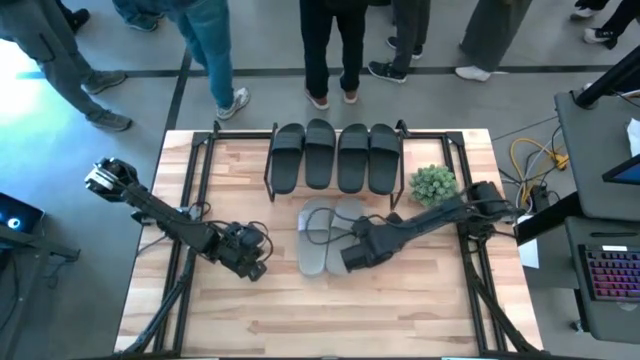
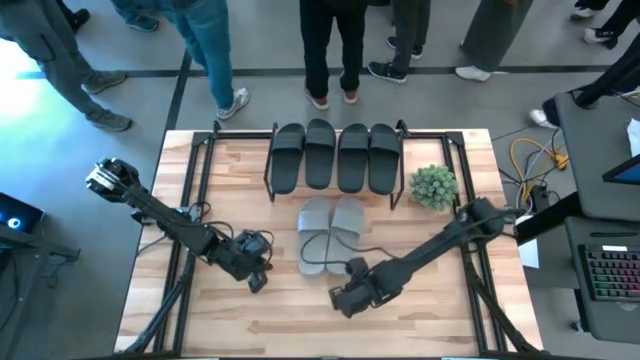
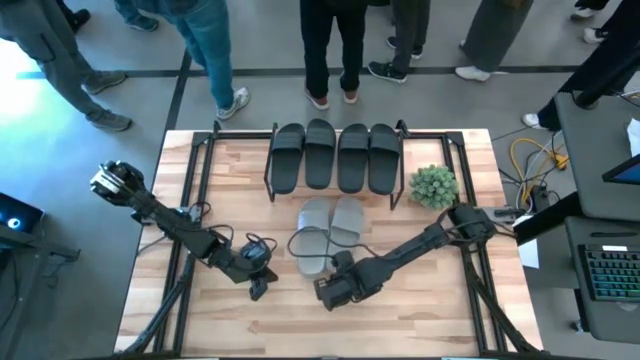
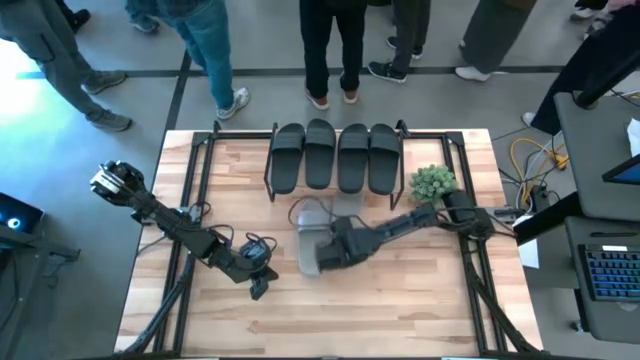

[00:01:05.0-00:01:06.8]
Task: Pick and place slides into the shelf
Move the gray slide under the shelf

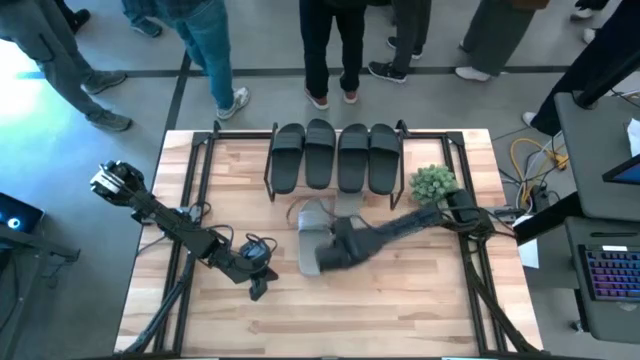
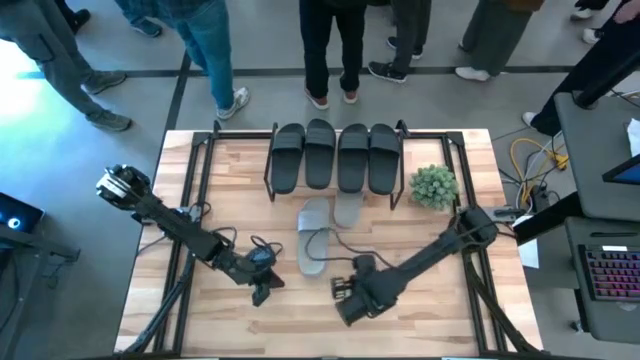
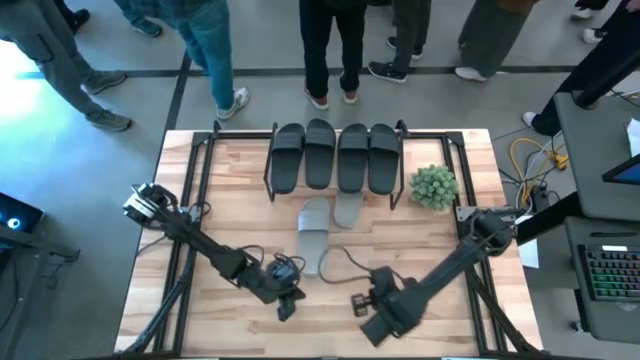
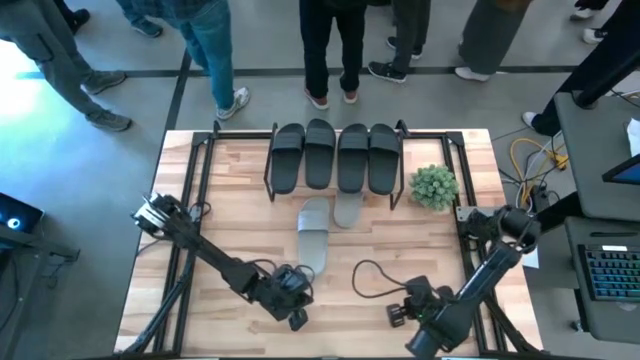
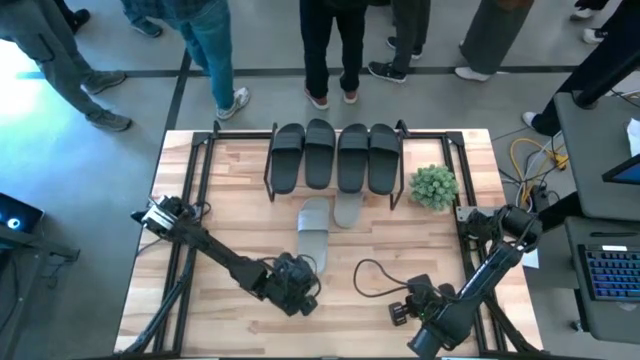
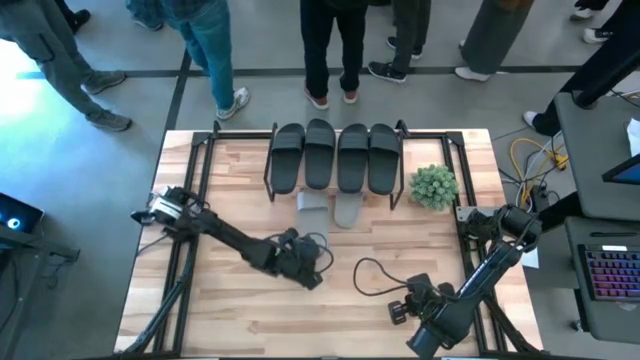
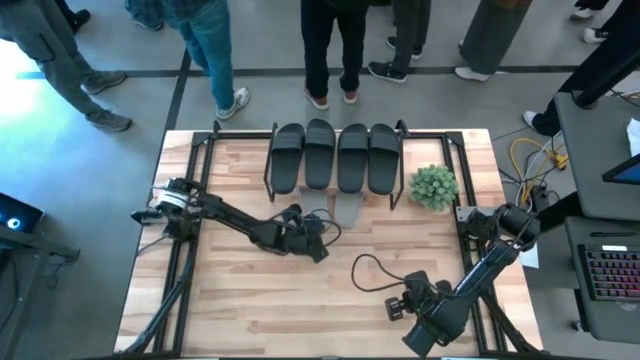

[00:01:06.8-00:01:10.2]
Move the gray slide under the shelf

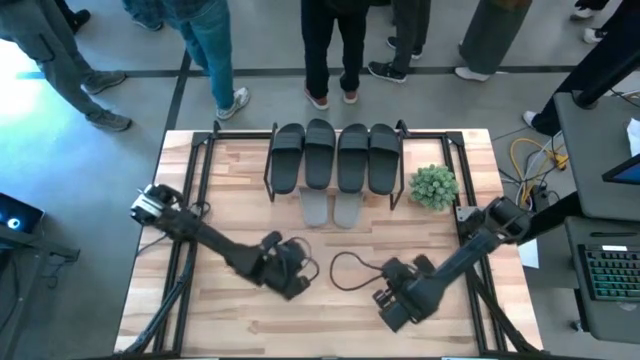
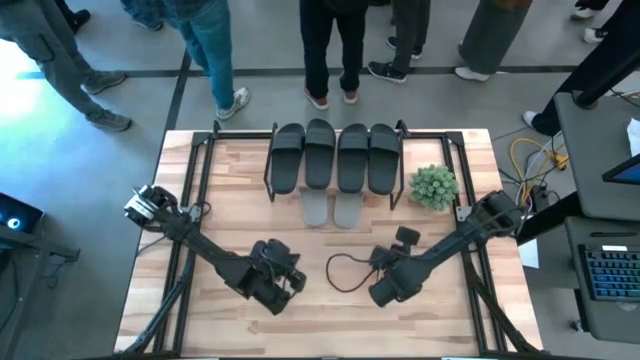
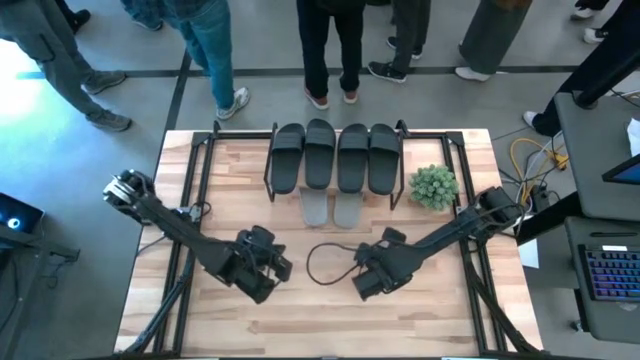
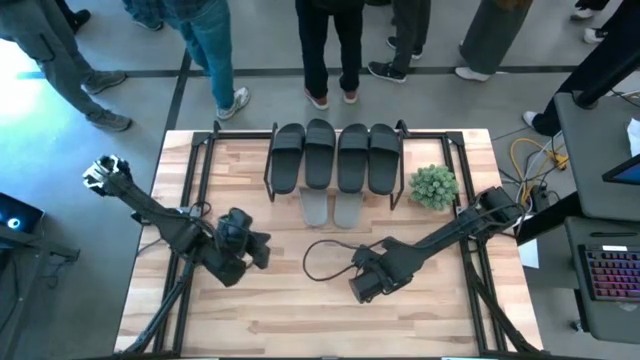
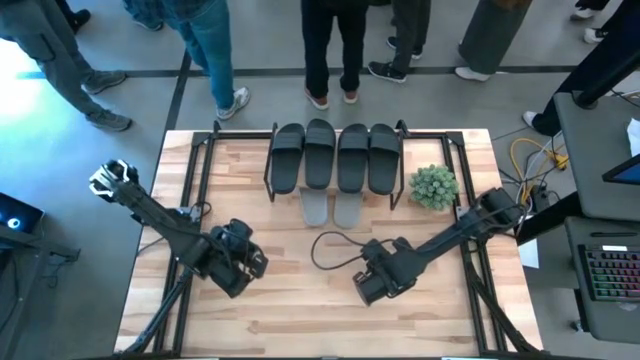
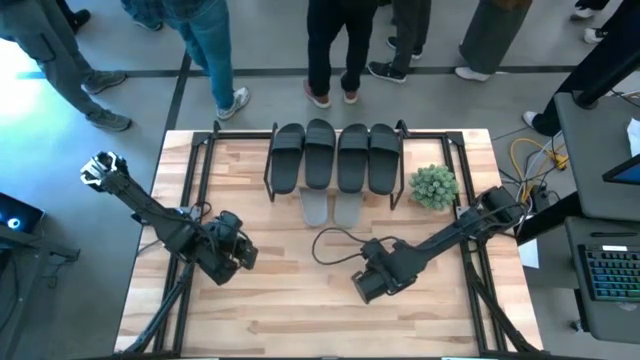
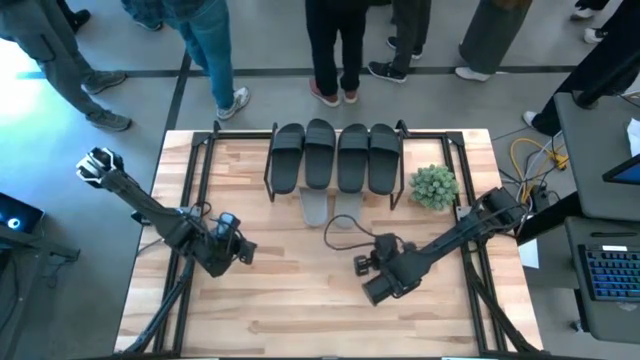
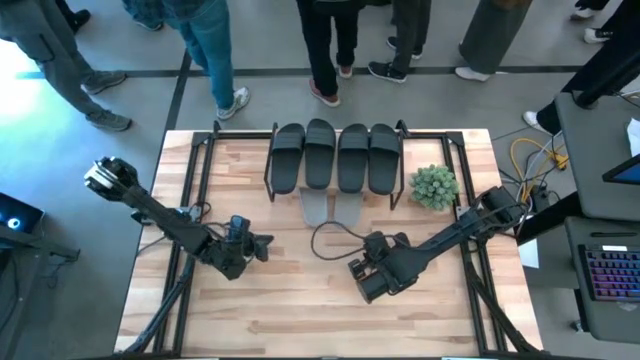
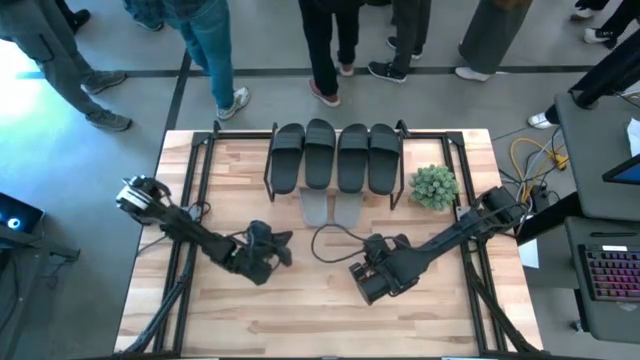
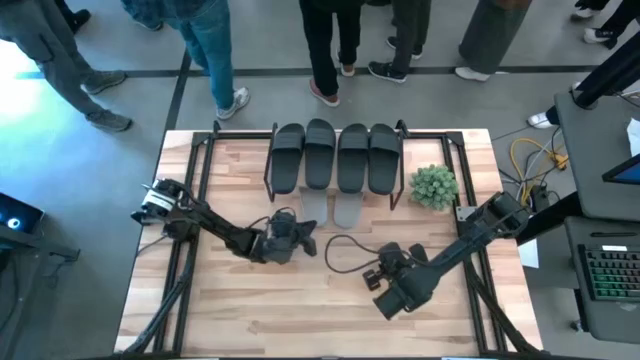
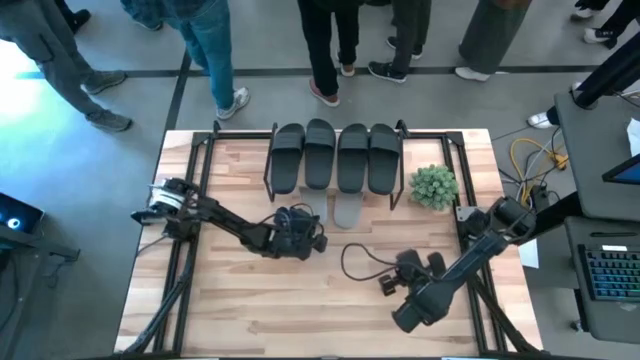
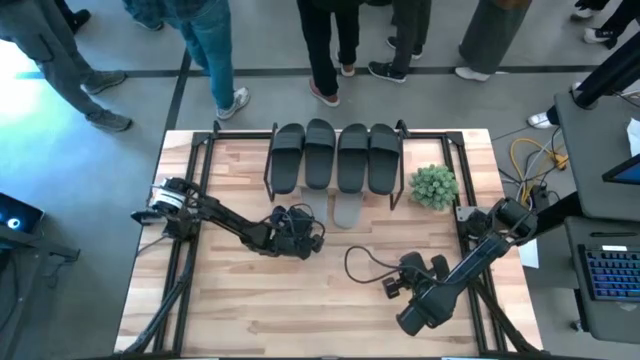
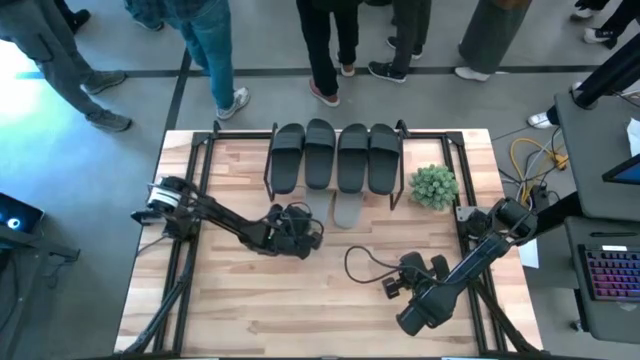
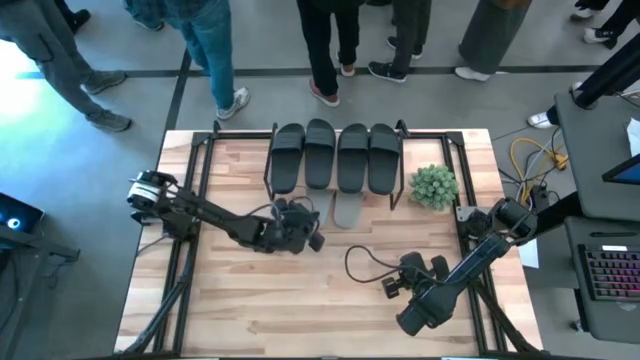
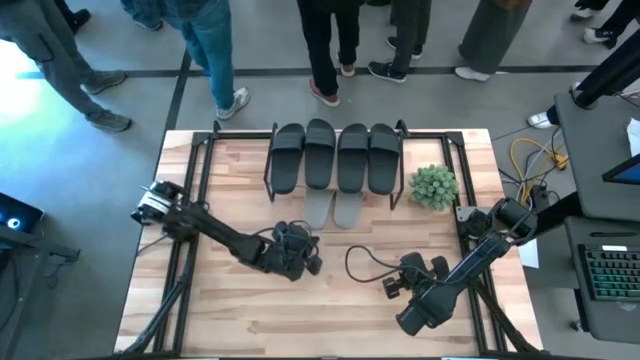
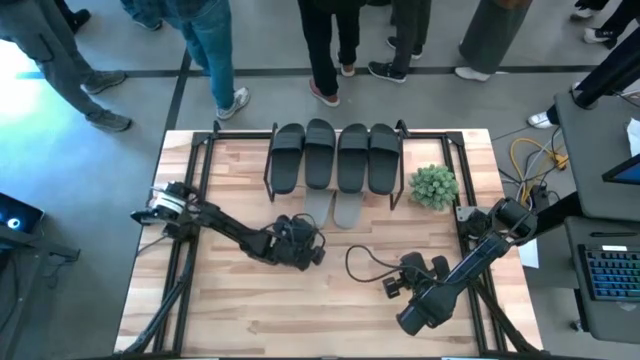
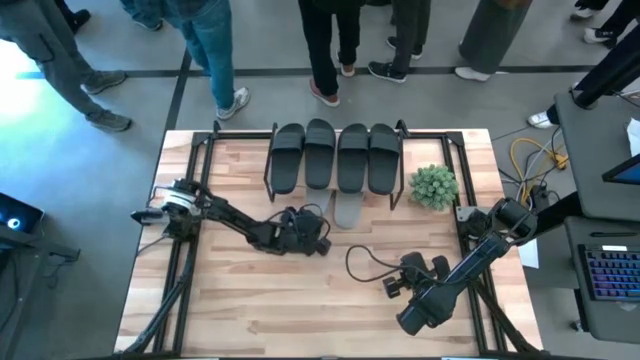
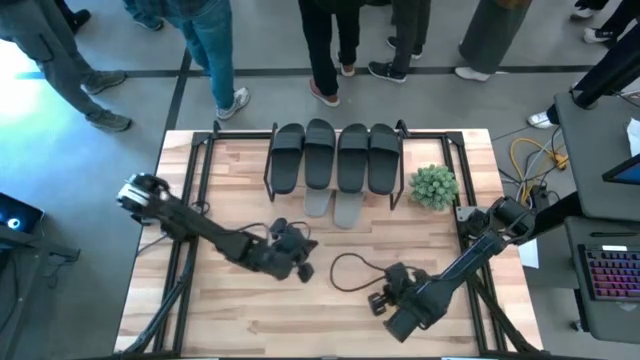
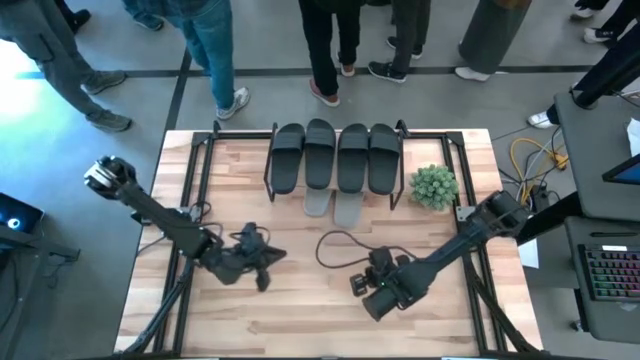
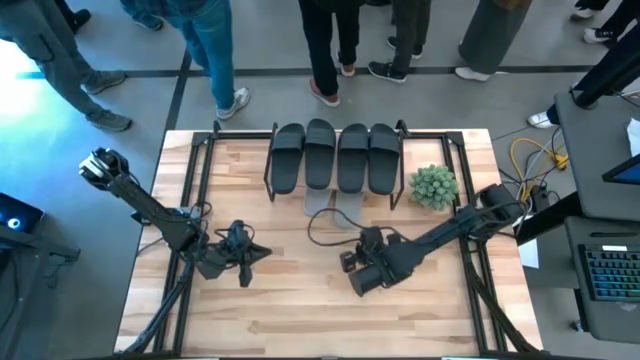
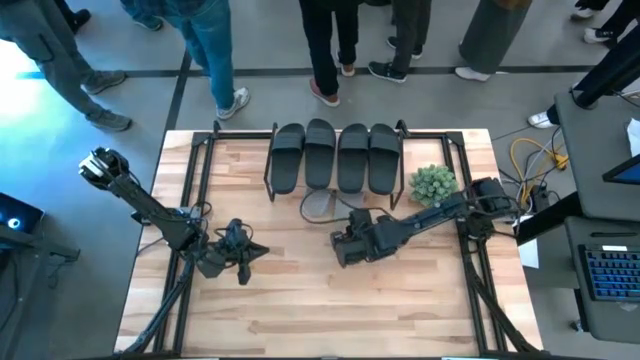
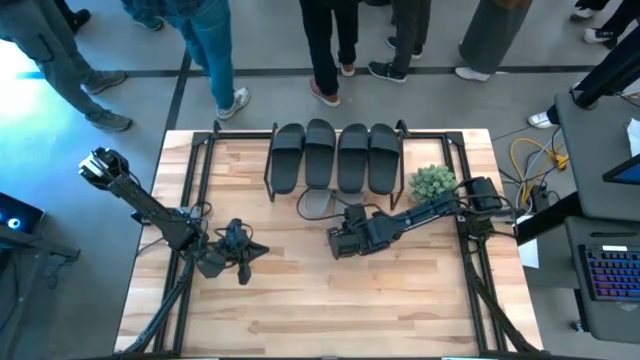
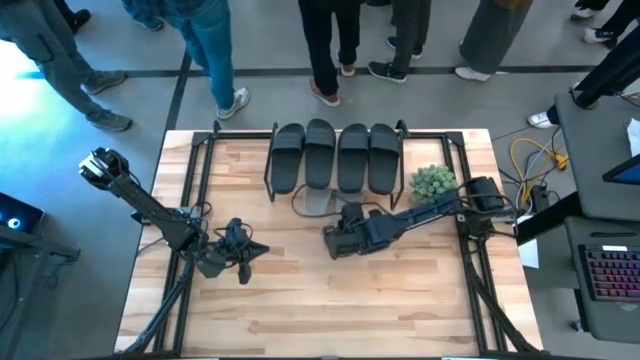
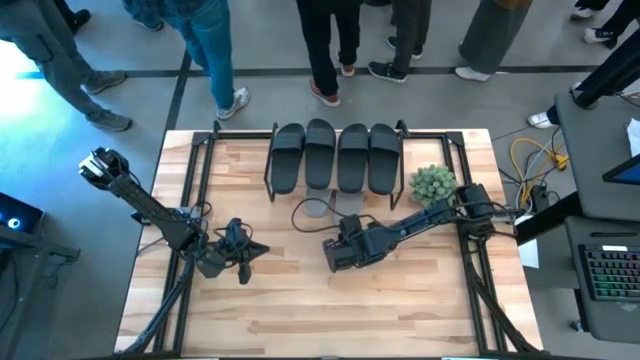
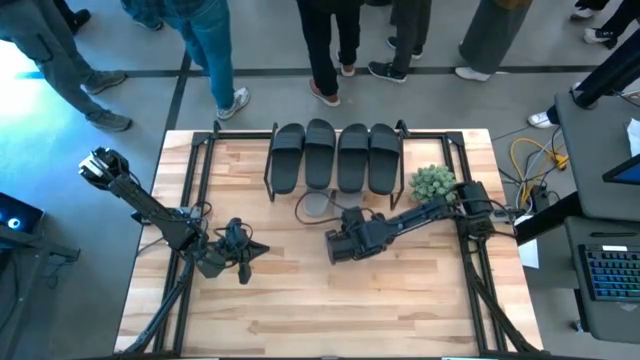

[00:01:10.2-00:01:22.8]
Adjust the gray slides under the shelf

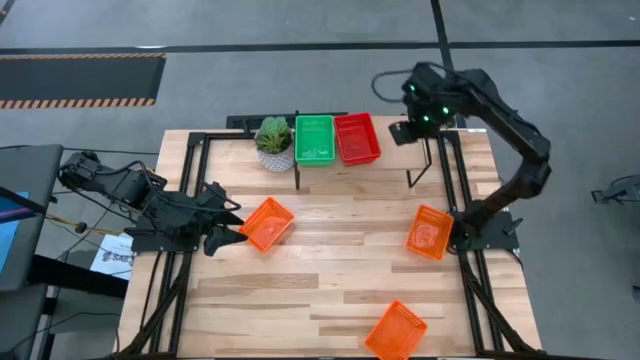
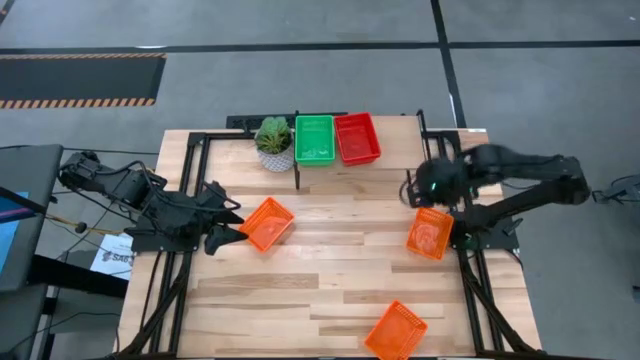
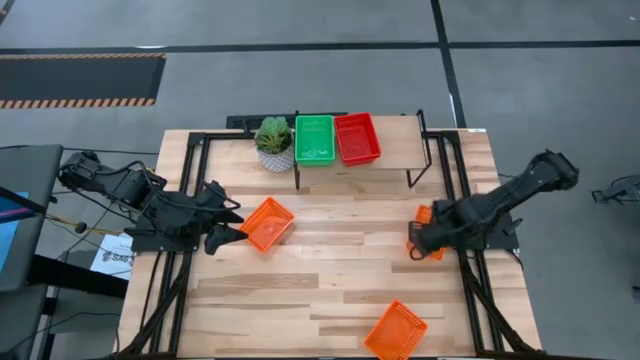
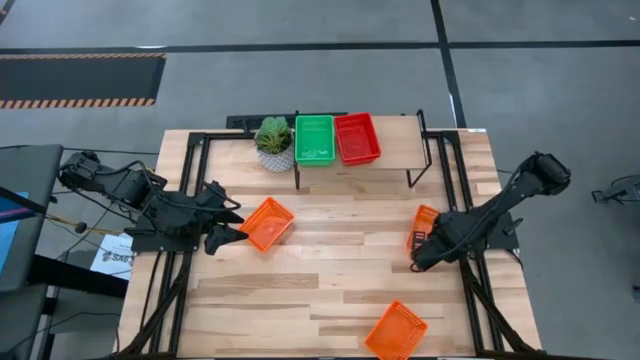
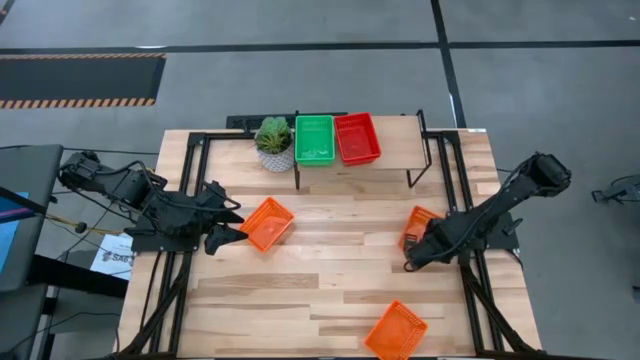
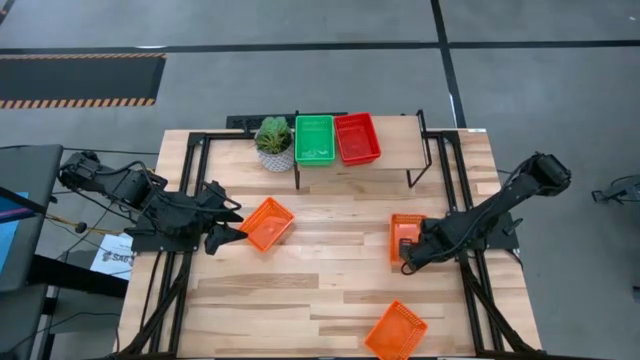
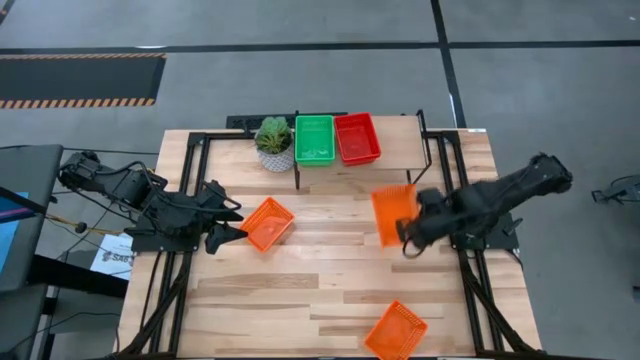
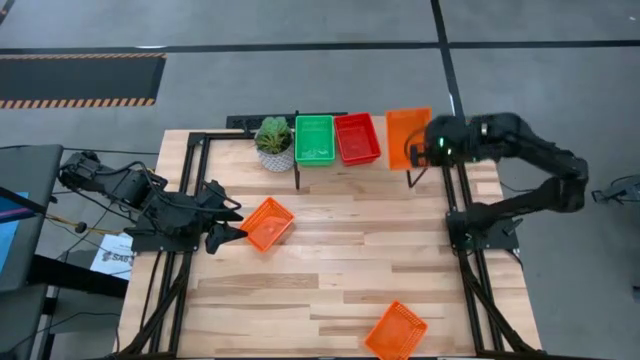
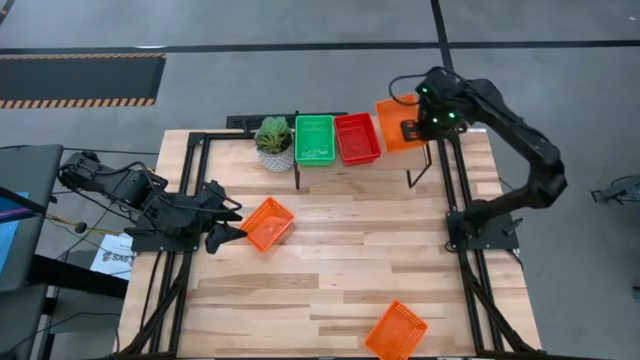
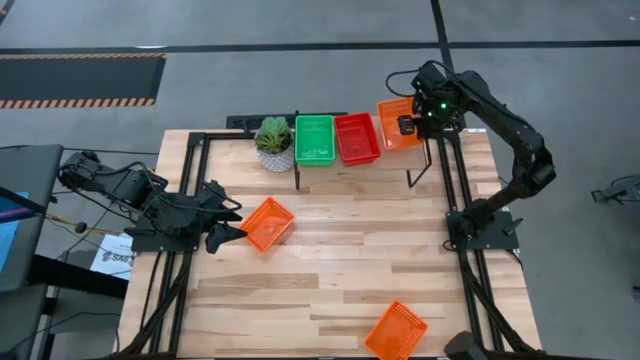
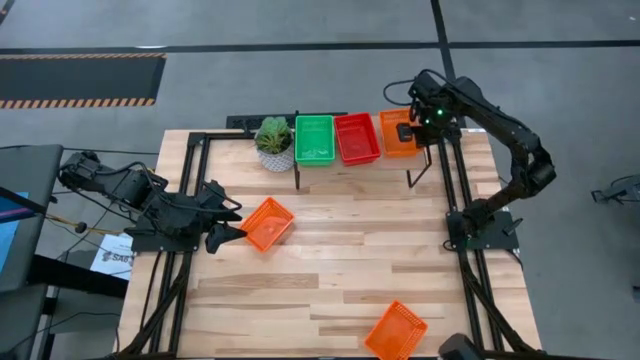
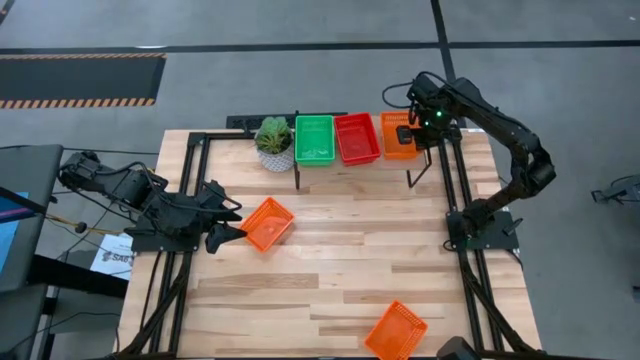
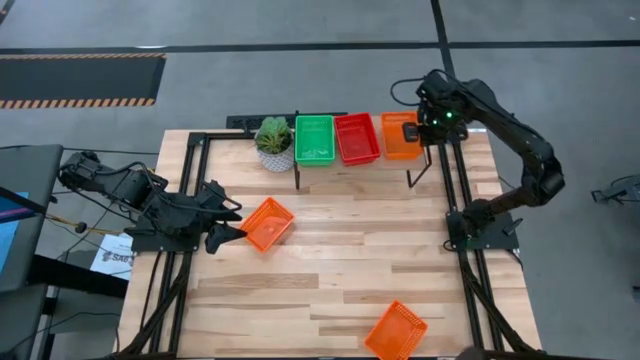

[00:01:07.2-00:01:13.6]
Task: Stack baskets on shelf by color
Put the top right orange bin on the shelf
